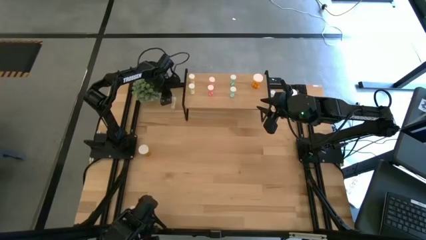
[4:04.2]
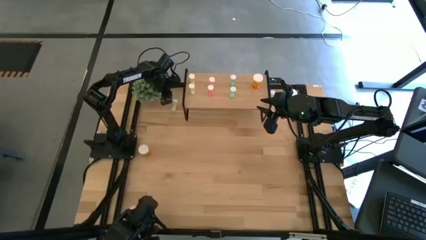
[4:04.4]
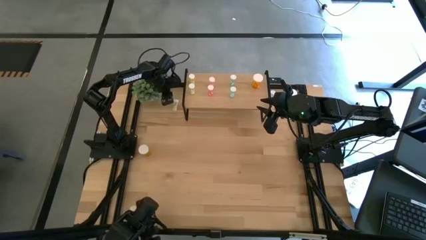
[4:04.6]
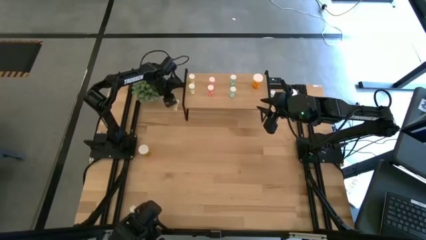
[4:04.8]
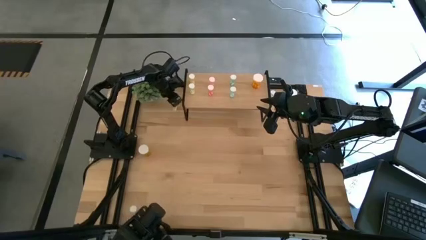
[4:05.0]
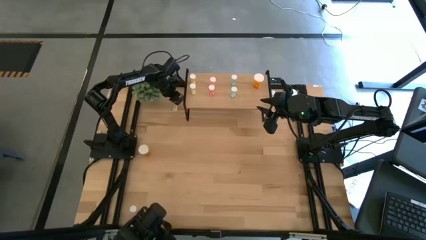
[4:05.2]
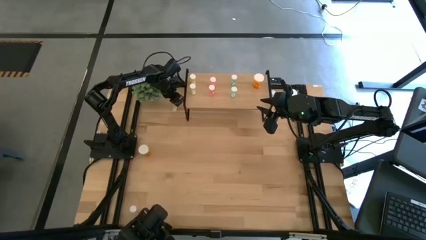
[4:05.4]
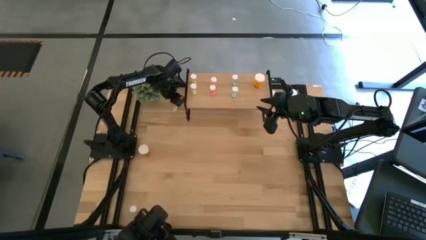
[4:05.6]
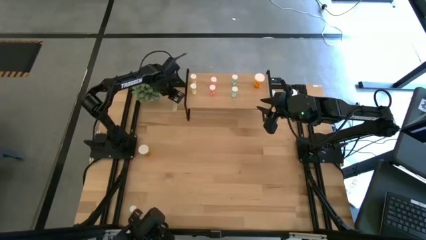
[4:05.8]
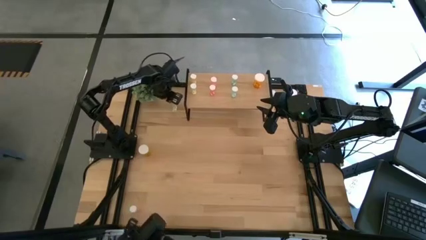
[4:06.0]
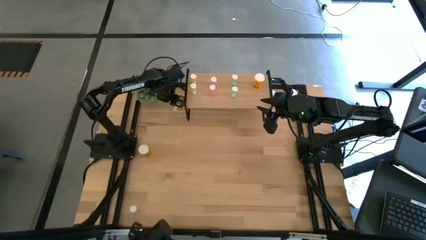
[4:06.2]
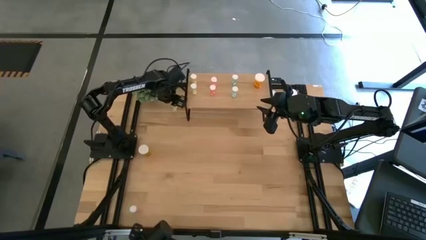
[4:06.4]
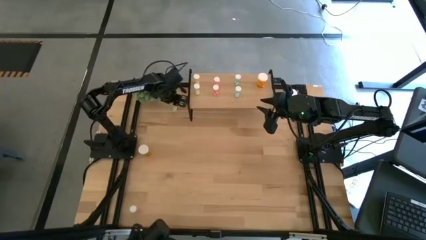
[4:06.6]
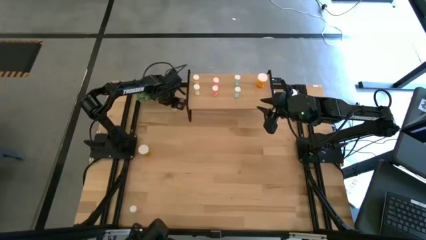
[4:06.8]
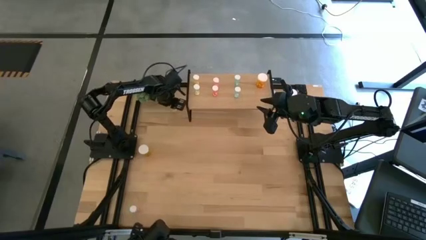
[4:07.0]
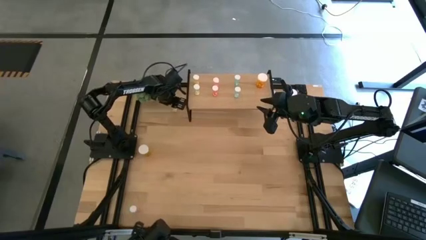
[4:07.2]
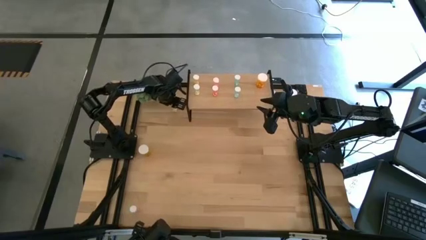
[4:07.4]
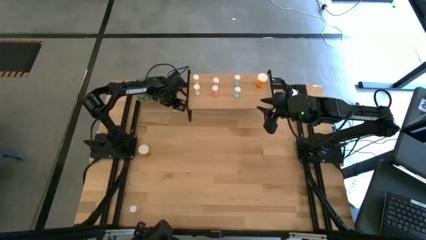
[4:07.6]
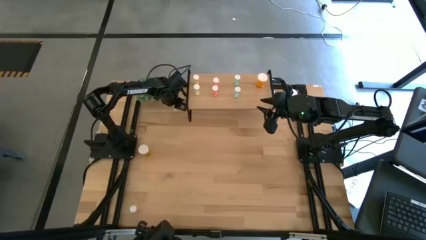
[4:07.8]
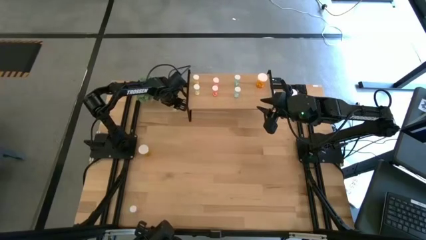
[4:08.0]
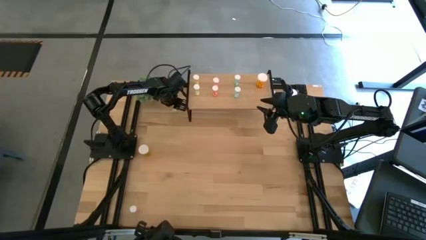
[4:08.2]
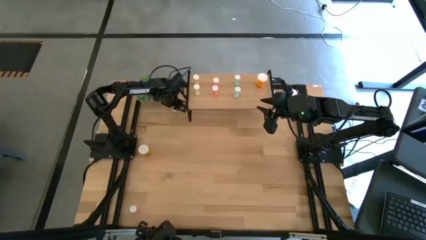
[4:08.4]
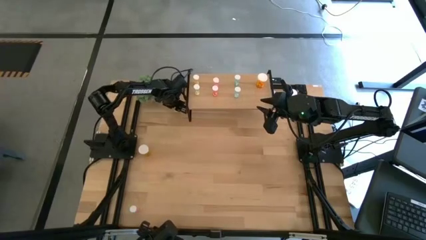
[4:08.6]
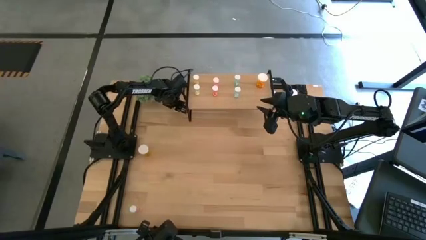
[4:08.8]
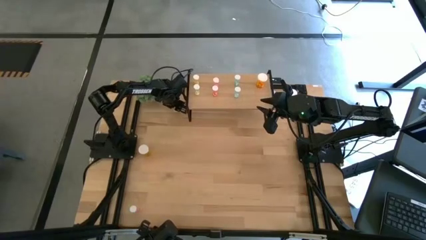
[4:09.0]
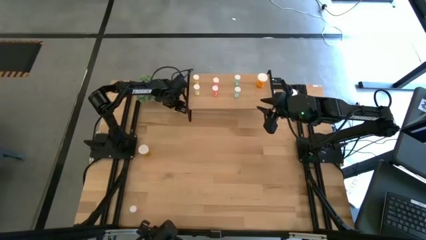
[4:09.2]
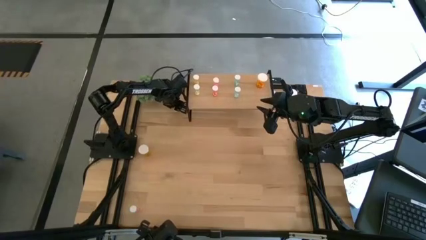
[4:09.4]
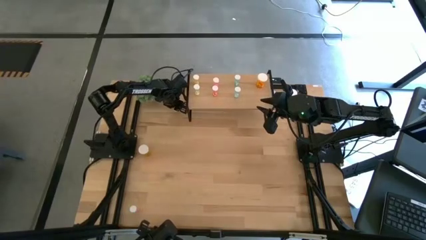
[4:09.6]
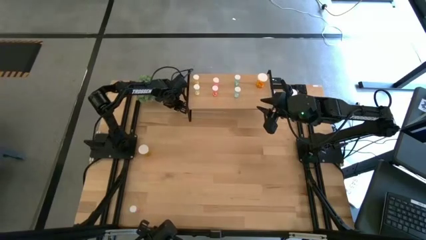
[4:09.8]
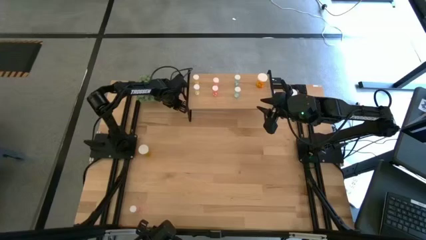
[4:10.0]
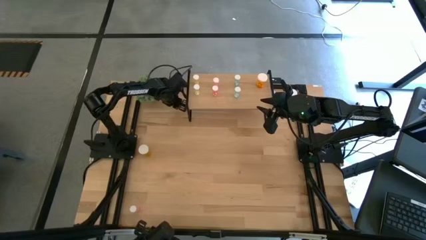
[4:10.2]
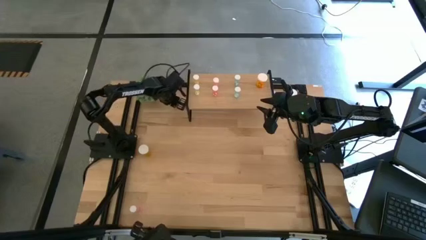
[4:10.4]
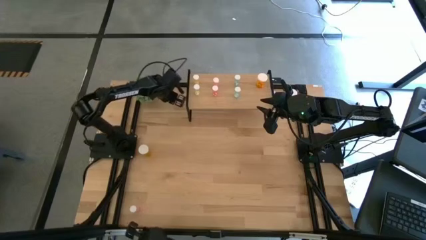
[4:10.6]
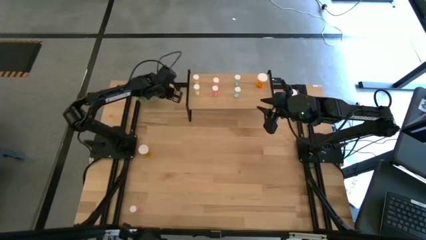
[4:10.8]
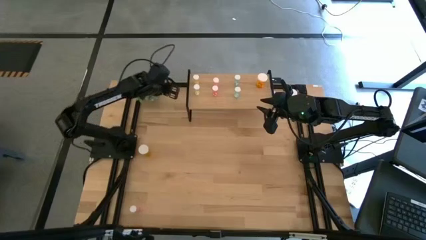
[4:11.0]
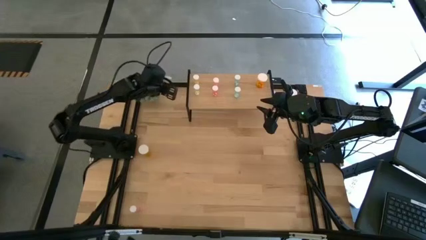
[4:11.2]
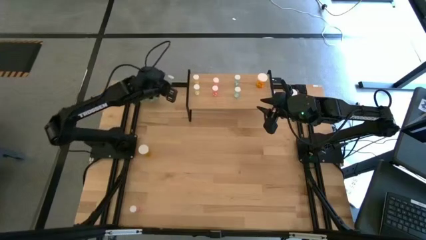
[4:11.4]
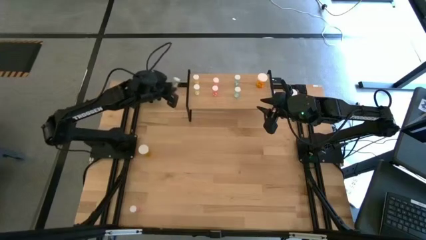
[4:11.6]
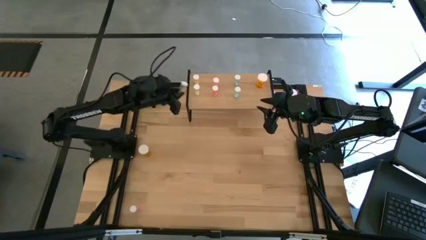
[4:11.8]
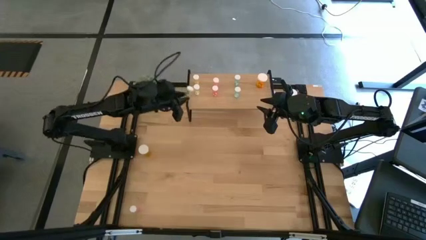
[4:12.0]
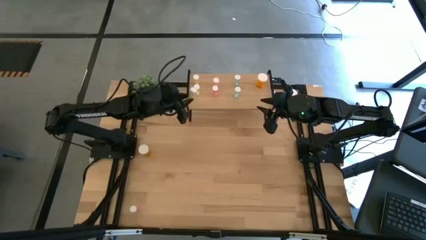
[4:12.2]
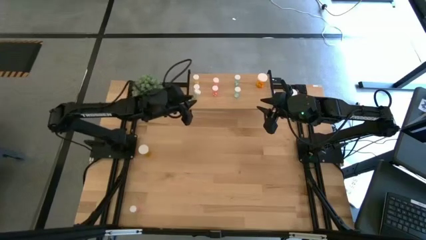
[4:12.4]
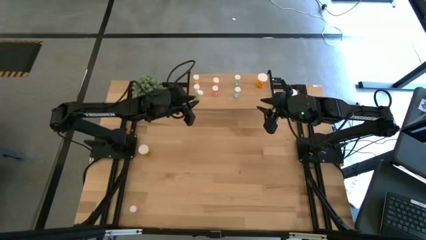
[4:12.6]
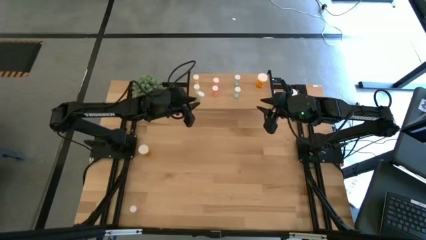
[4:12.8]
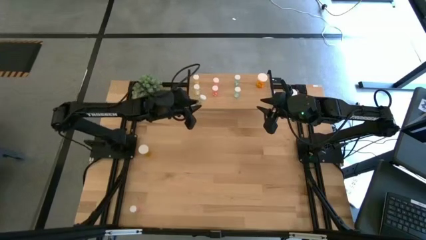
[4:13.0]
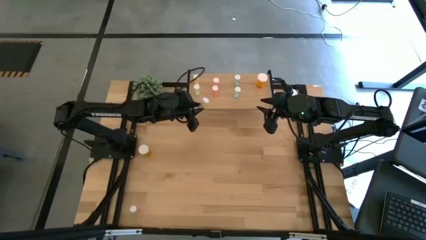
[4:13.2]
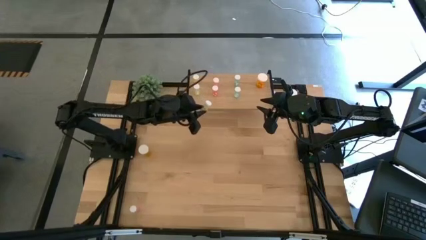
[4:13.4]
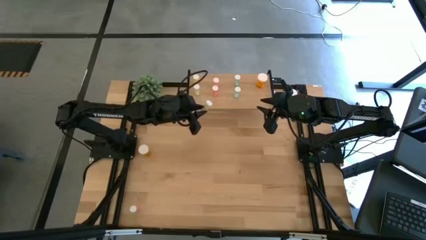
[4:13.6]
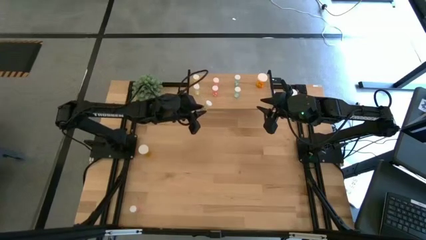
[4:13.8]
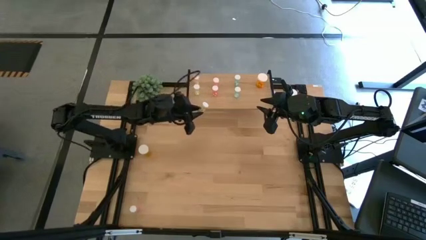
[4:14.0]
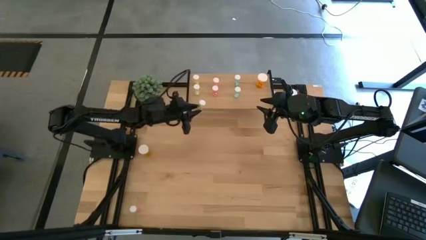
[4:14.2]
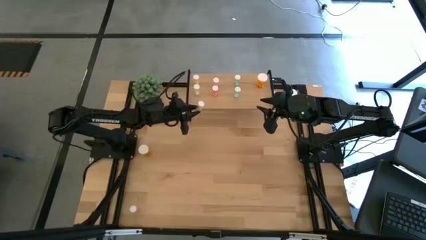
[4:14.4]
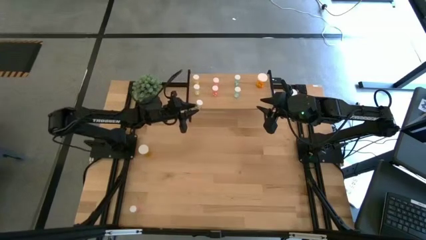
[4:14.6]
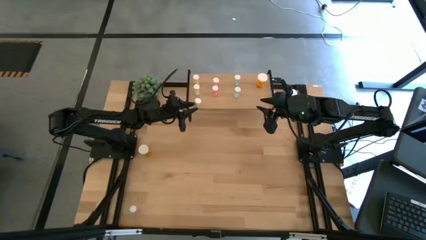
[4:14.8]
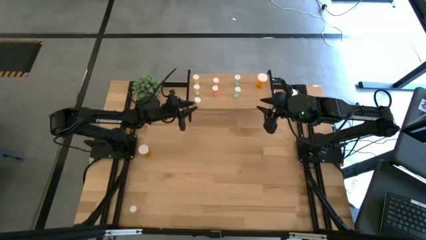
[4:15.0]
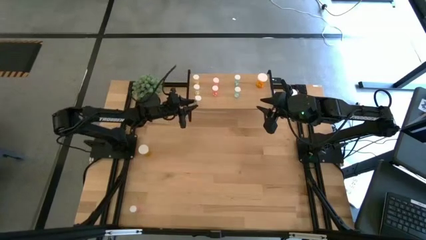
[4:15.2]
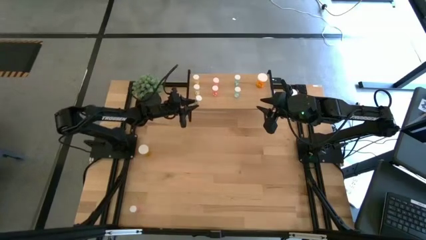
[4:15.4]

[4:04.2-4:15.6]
Task: Pick and place medicine bottles onto shelf by color
Put the yellow pill bottle on the shelf aligned with the other yellow pill bottles

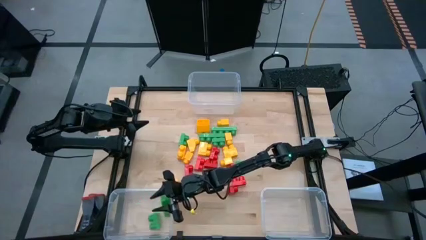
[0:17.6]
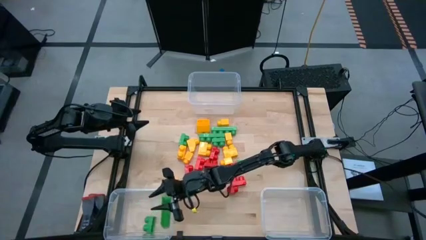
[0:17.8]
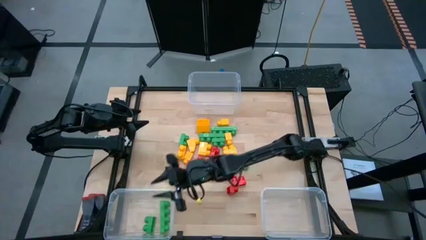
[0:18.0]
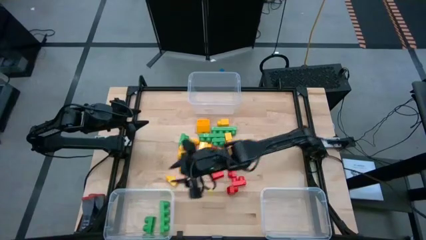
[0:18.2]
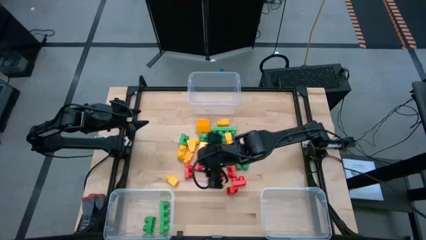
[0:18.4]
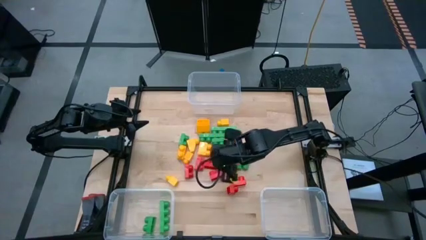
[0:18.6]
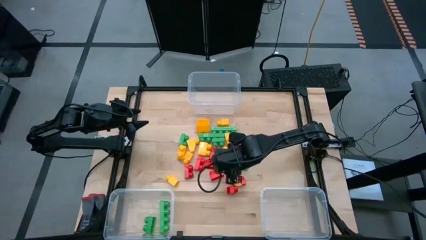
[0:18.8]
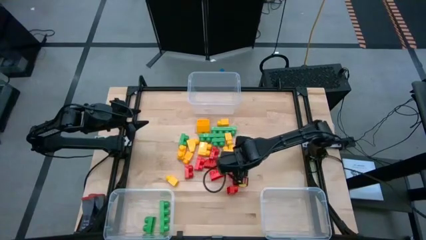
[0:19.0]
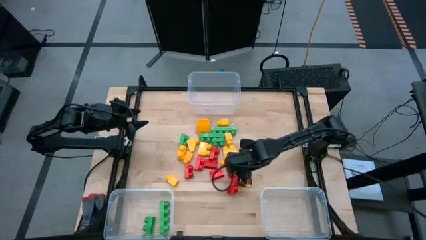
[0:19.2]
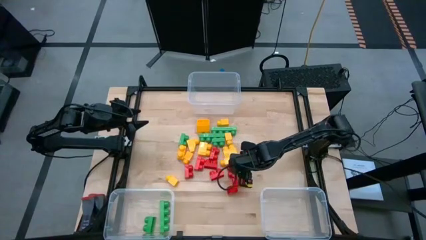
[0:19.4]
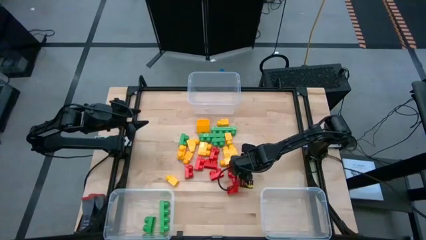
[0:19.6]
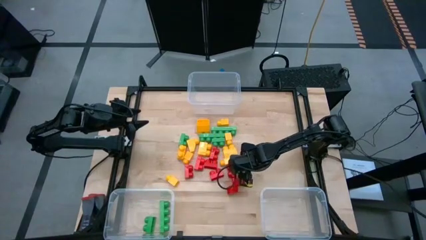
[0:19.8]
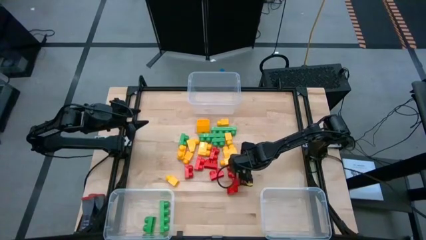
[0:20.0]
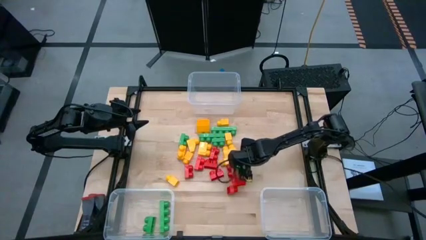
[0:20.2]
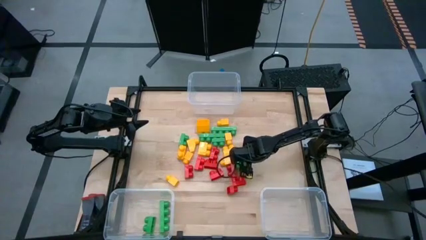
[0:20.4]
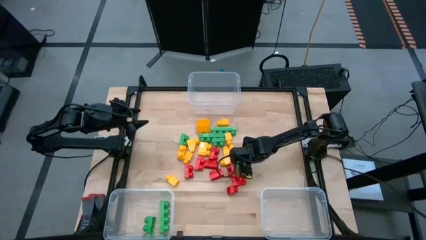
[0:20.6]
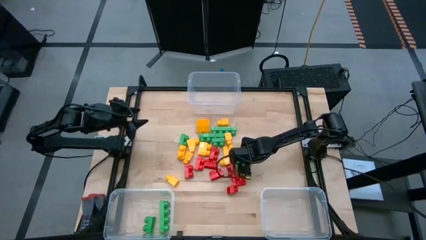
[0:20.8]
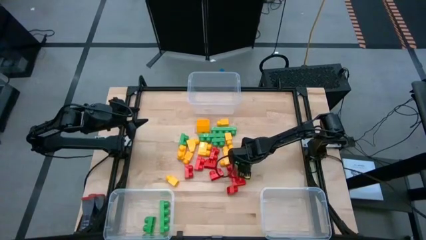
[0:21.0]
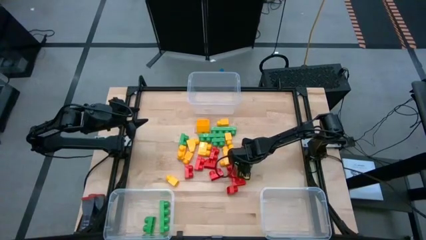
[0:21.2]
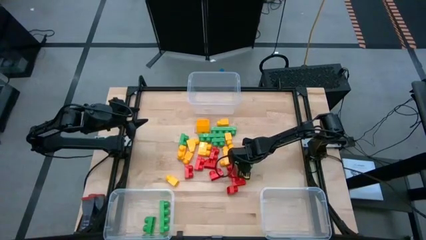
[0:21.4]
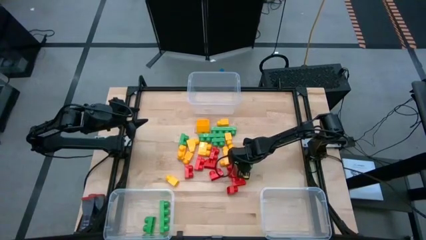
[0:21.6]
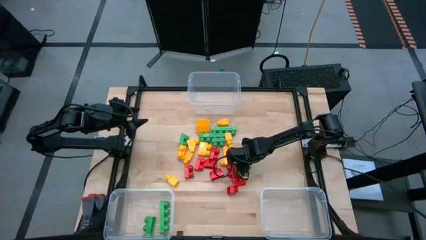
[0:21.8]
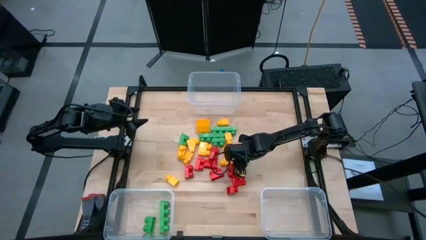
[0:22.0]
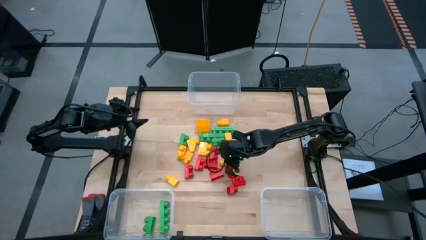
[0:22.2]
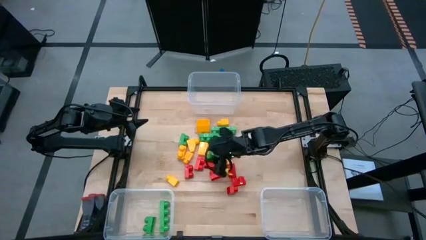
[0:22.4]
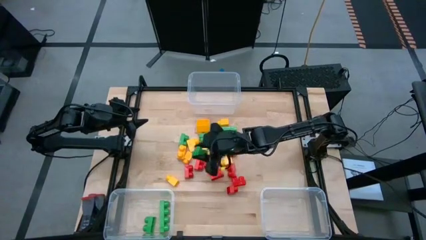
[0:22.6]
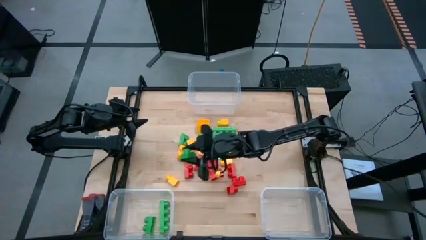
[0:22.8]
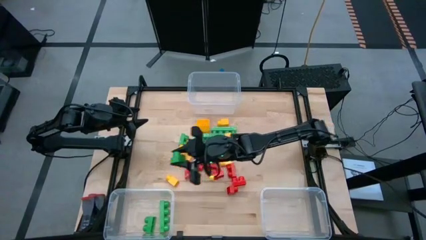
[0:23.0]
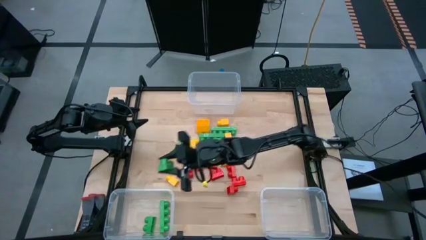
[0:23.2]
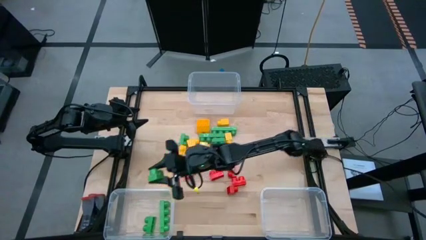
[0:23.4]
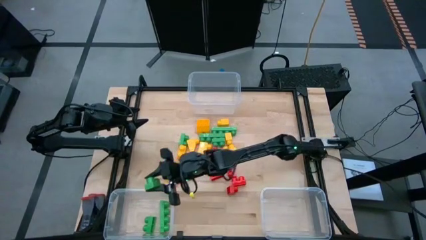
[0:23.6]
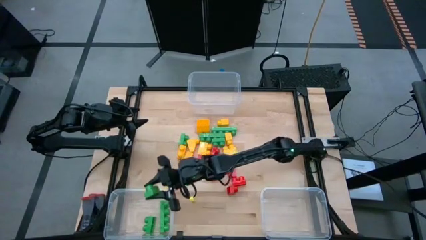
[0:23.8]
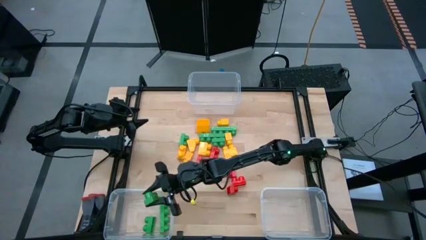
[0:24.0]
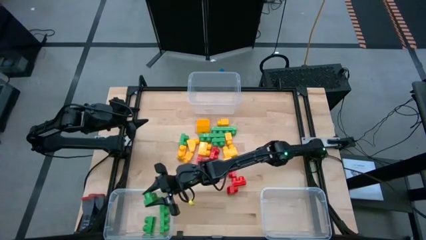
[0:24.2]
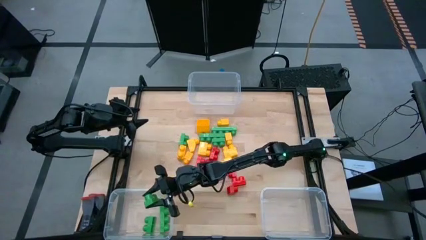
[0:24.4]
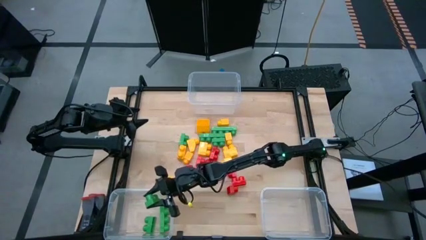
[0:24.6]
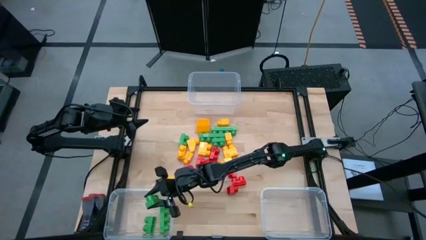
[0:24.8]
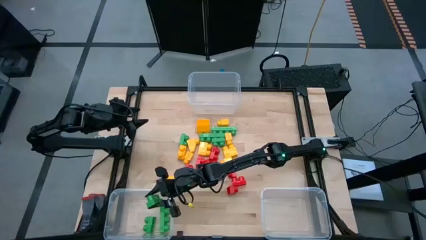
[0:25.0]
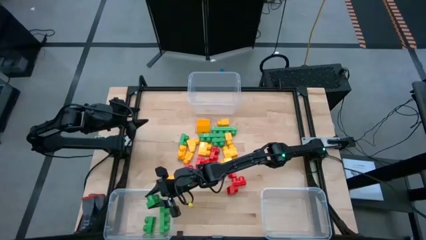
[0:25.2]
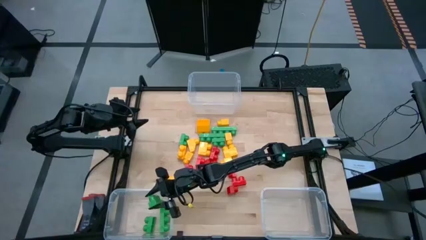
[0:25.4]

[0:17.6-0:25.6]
Task: Sort blocks
Put the green game piece into the bottom left transparent bin
